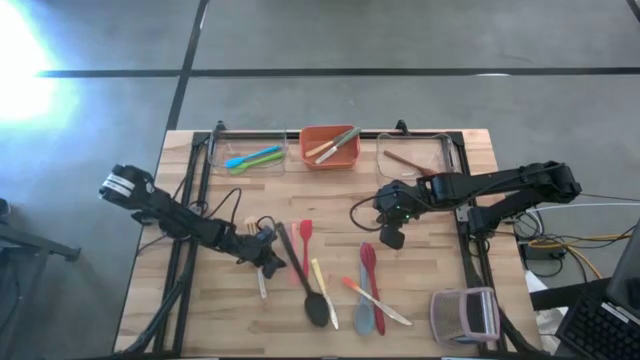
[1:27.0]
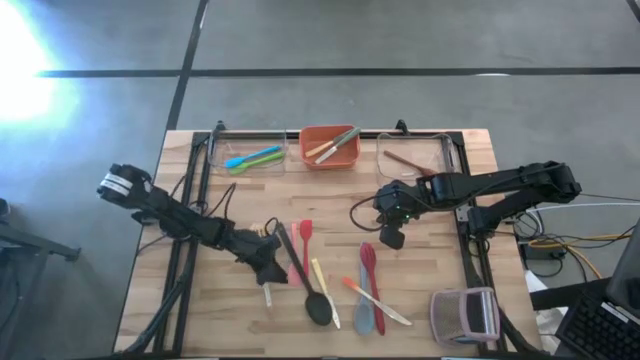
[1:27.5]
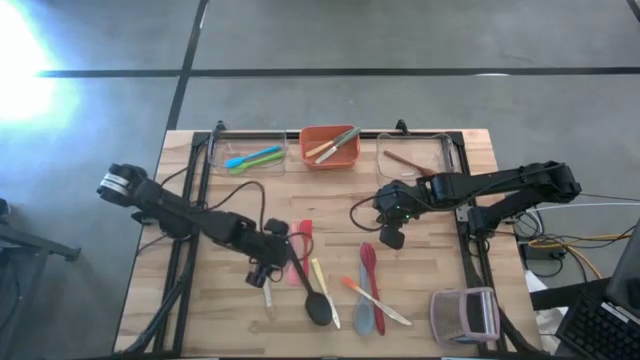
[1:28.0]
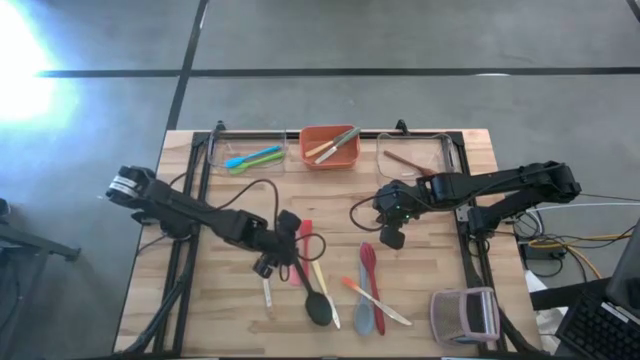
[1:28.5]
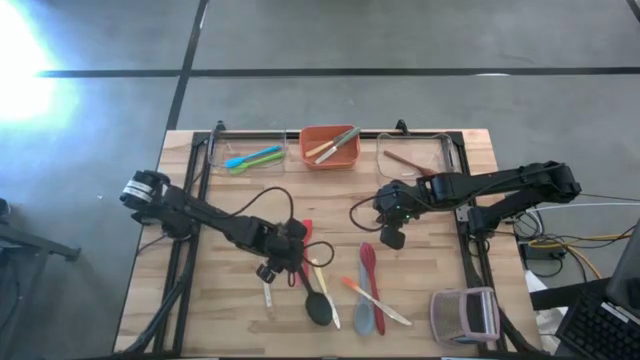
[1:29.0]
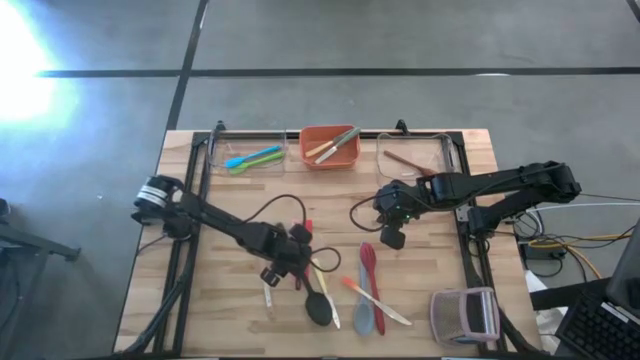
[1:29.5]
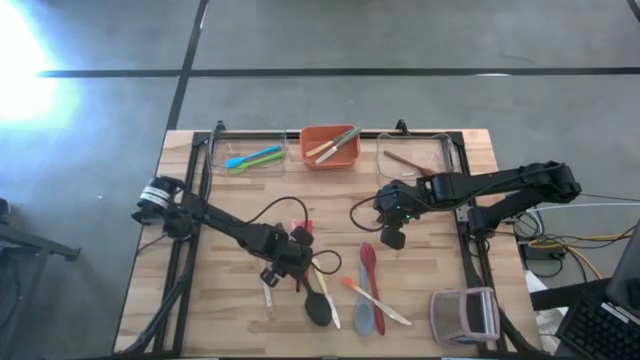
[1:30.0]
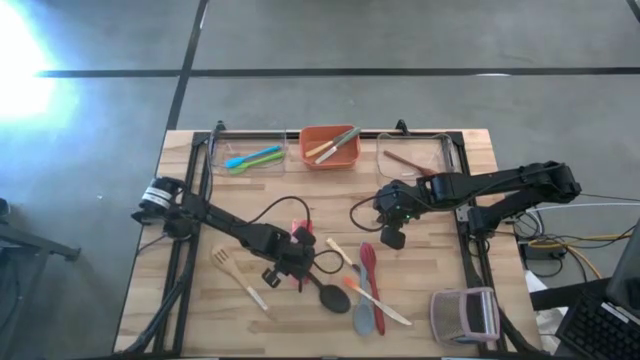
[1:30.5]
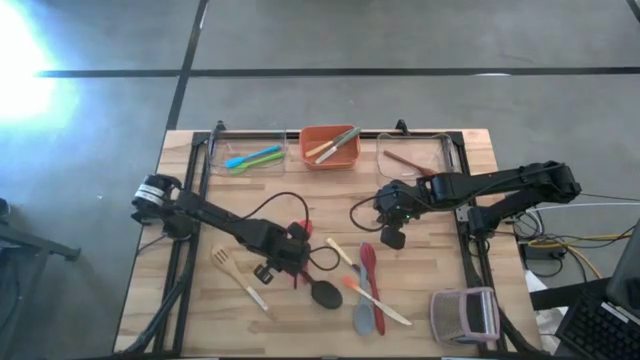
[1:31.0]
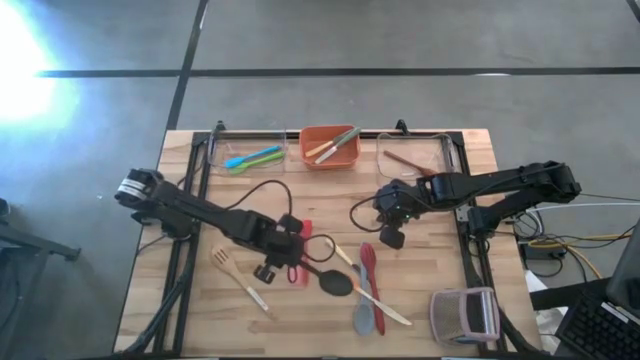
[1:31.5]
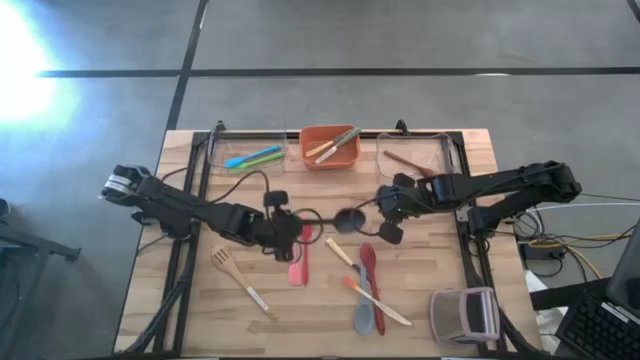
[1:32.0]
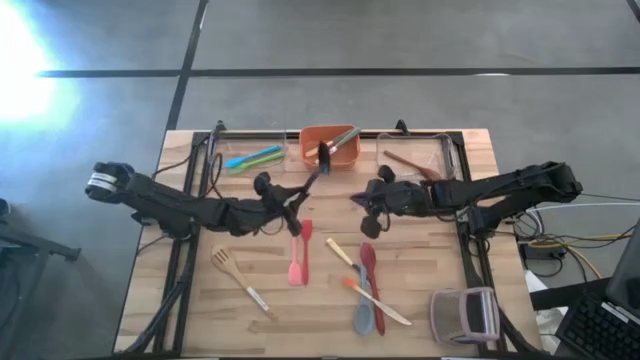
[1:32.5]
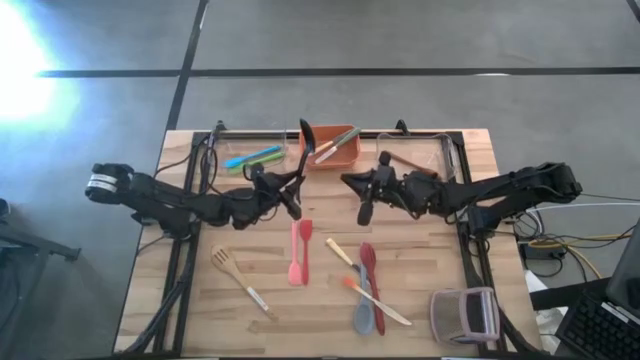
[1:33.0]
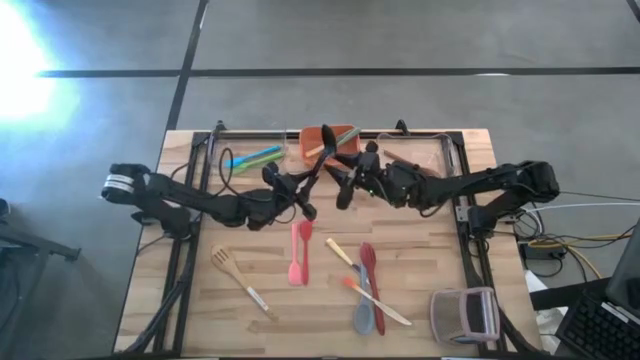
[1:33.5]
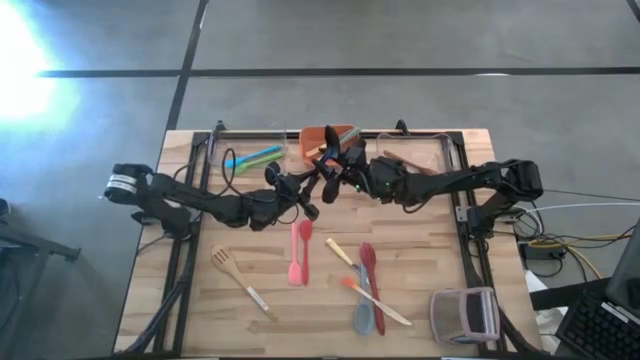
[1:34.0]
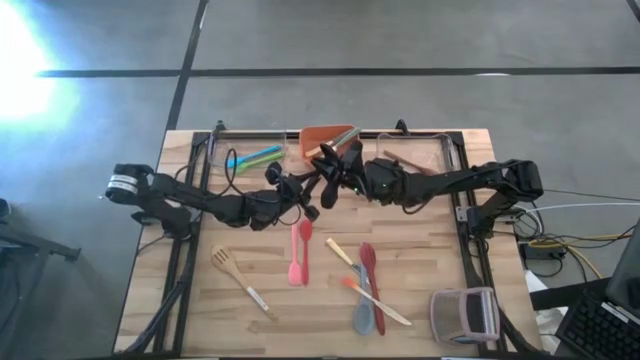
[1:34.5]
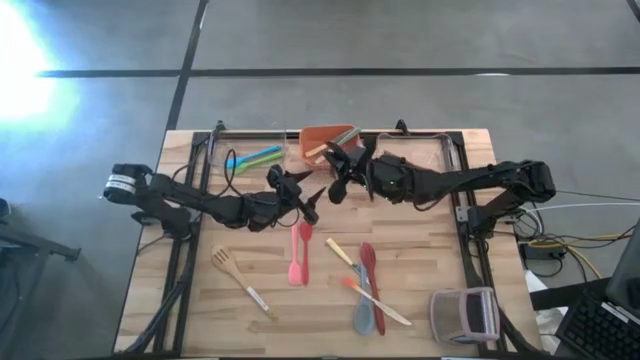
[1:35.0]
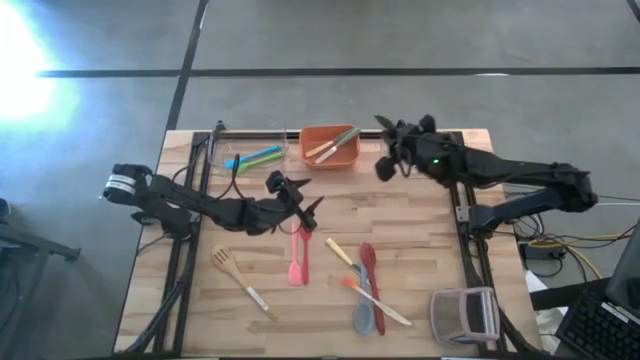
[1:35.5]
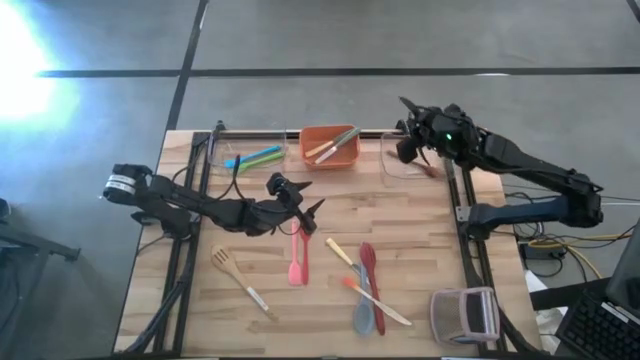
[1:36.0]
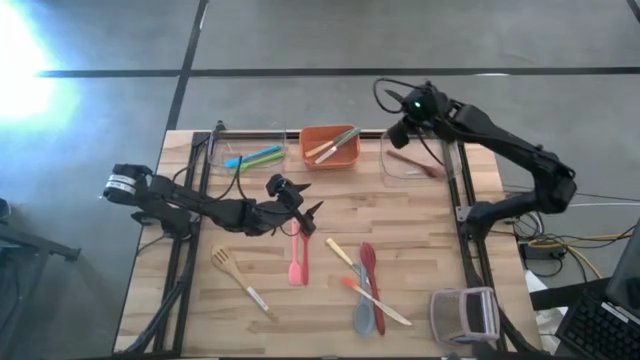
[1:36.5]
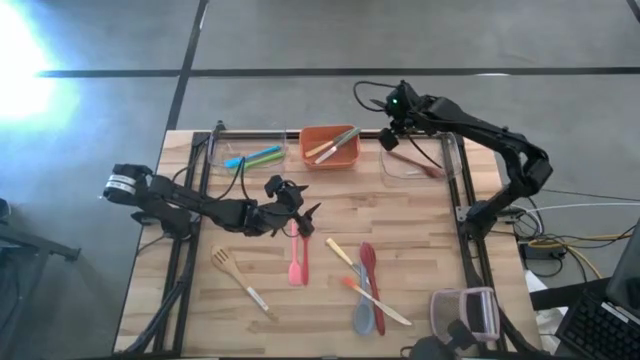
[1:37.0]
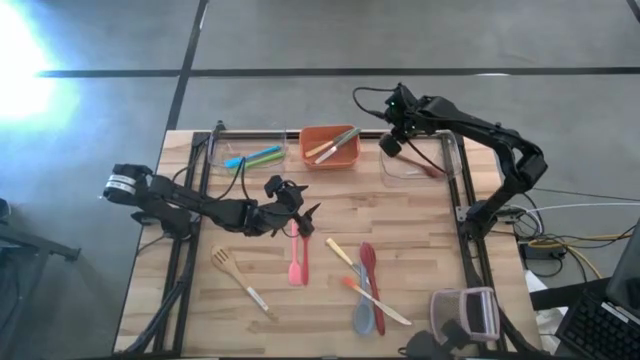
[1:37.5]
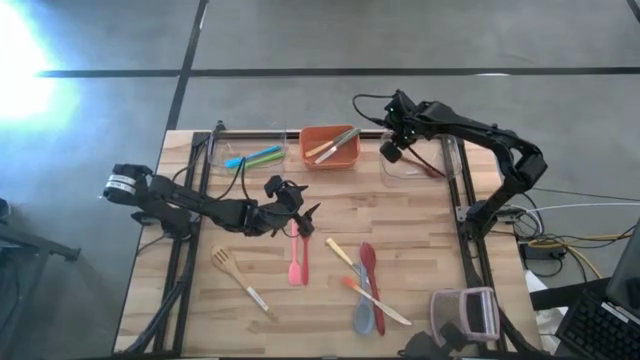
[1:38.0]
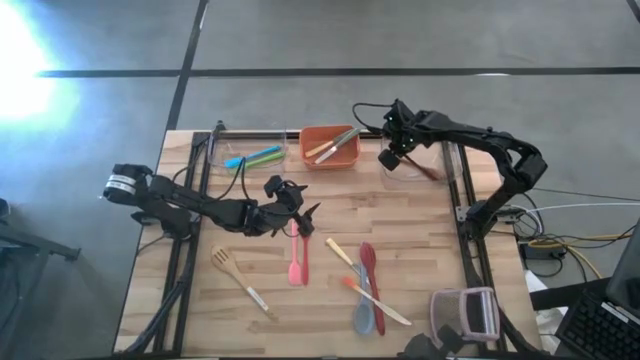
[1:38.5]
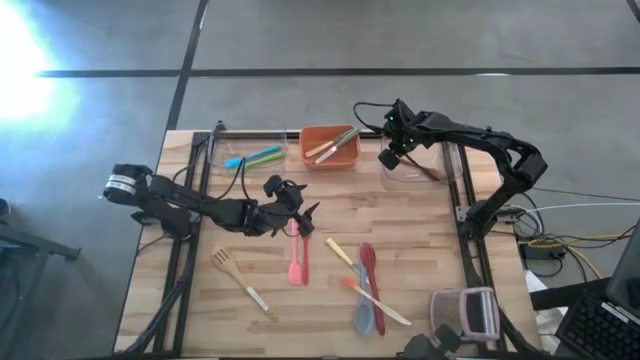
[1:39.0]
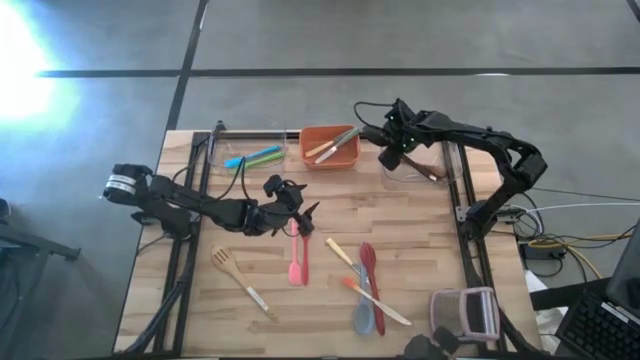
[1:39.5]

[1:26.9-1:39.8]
Task: Pick & Place Kitchen Items
Put the black serving spoon into the right transparent bin

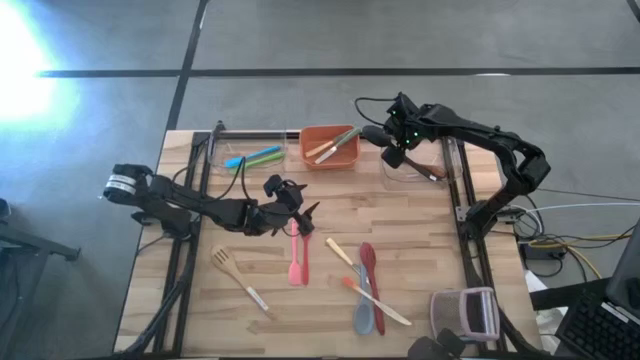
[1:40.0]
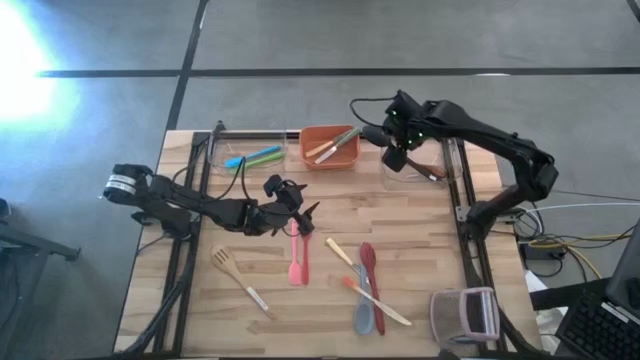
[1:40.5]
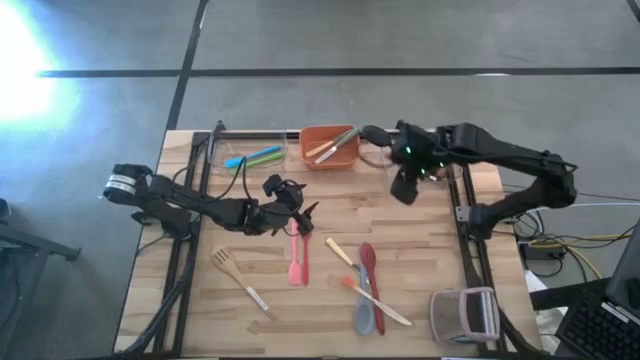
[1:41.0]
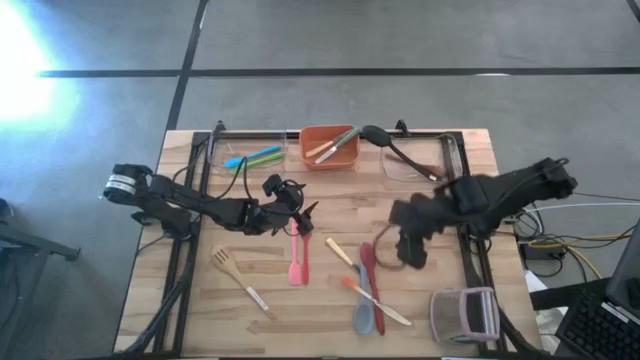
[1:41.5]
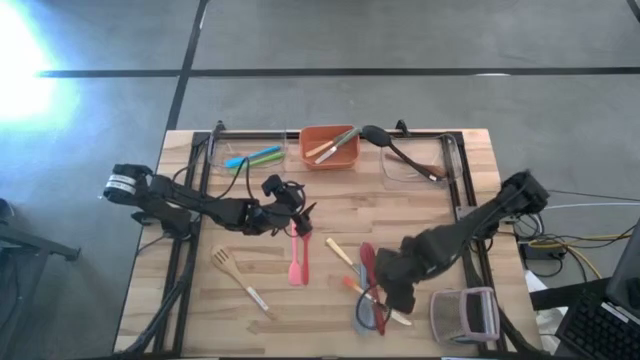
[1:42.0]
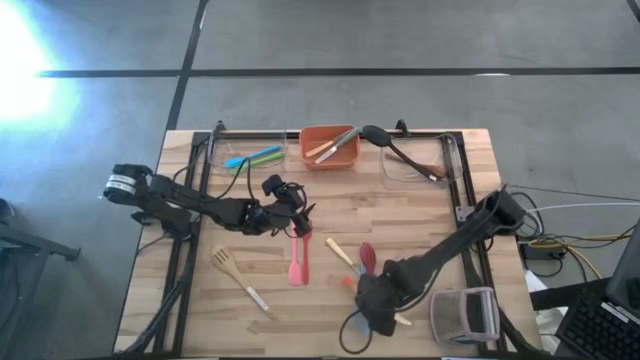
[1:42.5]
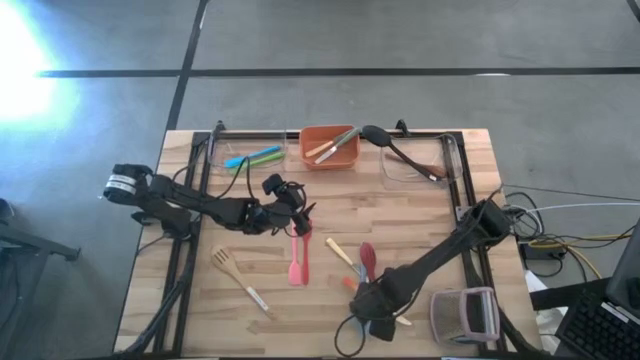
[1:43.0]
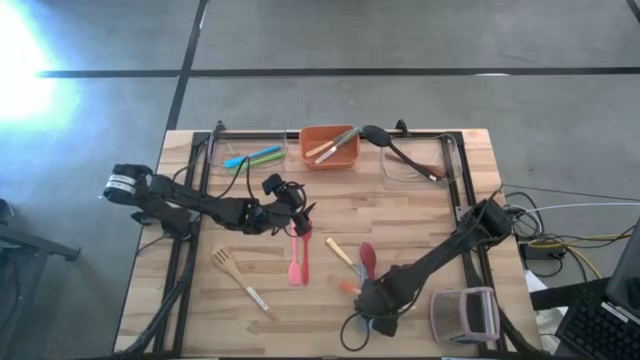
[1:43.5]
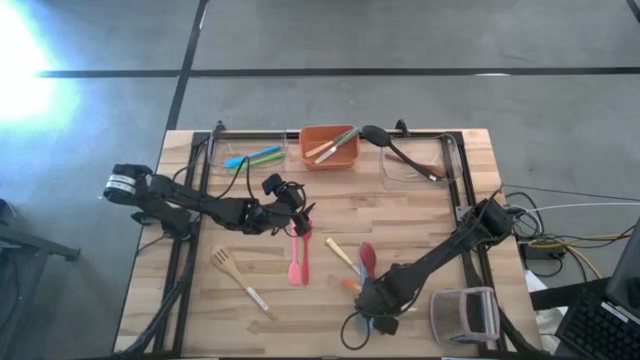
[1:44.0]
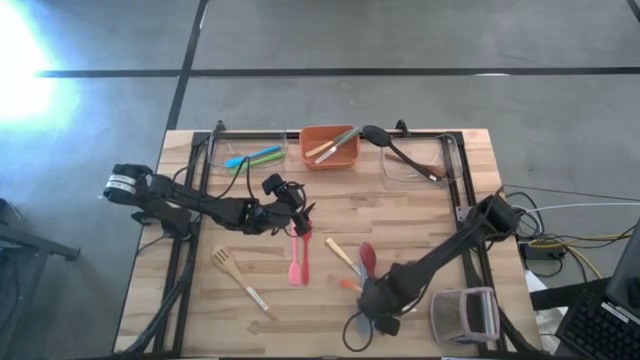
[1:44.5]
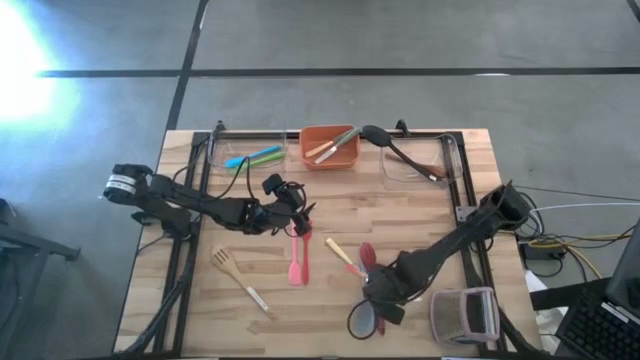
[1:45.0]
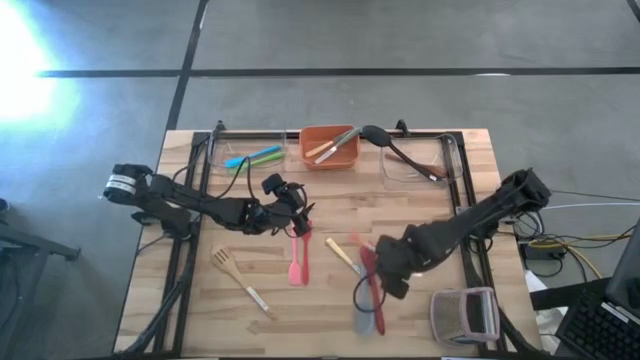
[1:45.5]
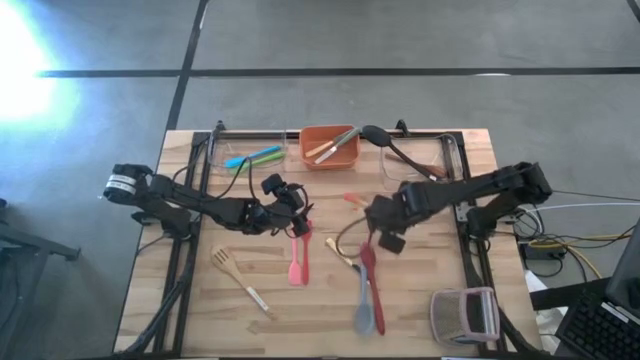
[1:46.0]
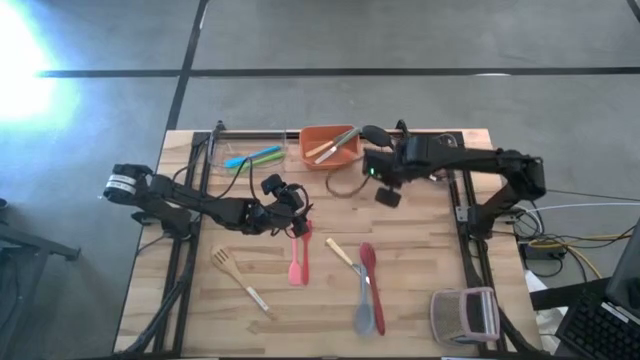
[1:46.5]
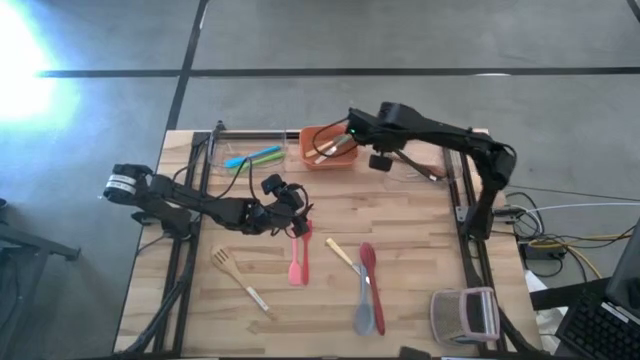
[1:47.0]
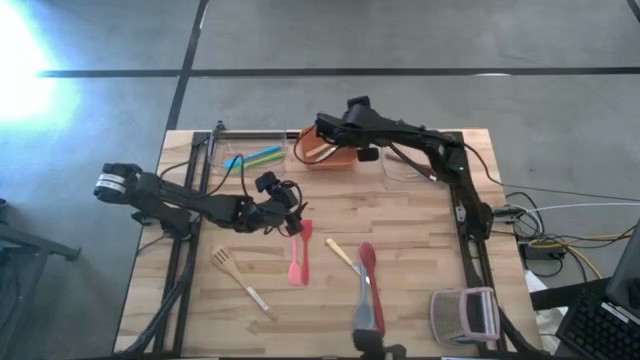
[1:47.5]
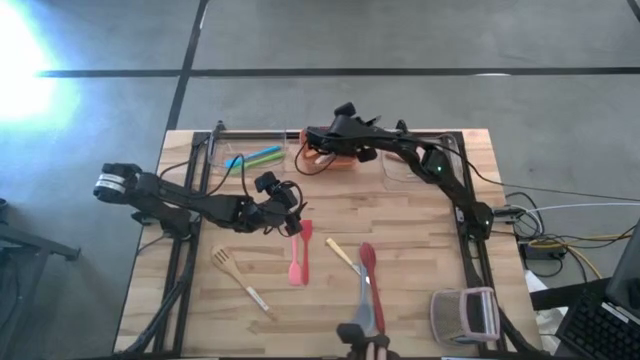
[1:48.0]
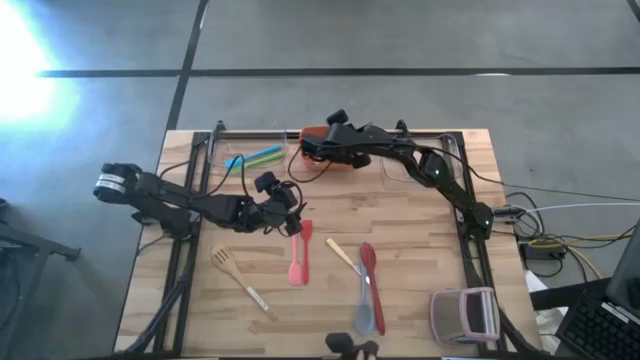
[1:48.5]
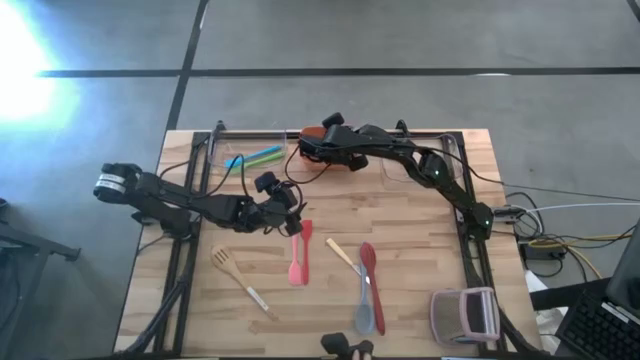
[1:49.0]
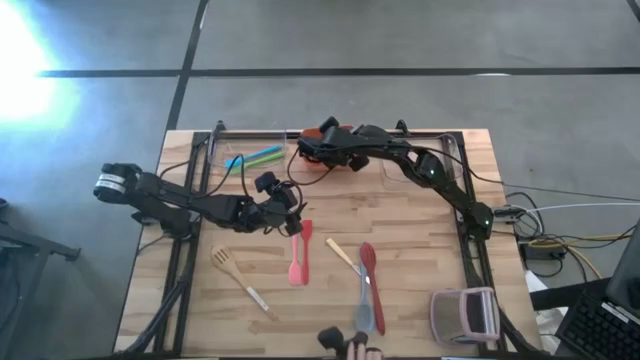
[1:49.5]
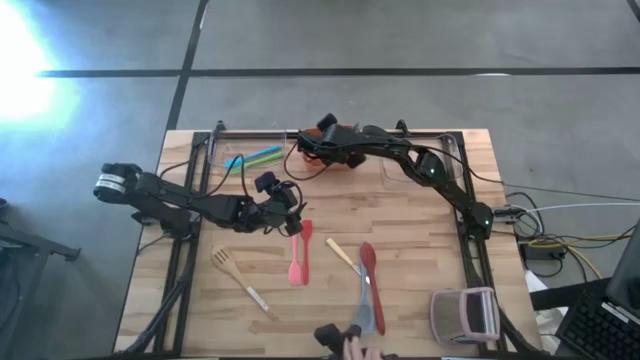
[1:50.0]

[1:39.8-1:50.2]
Put the orange knife into the orange bin
